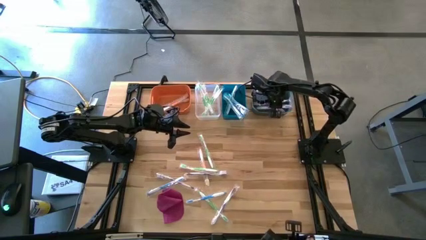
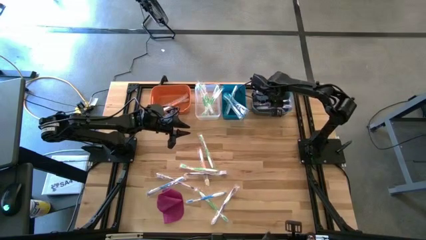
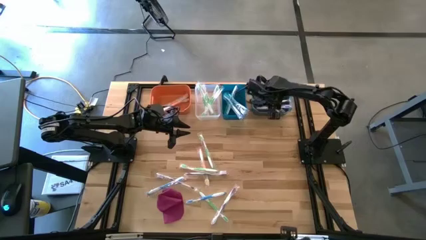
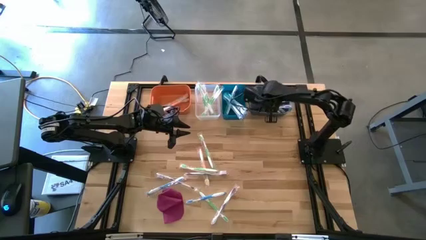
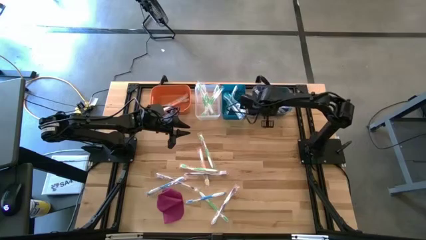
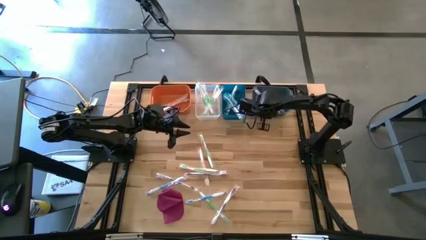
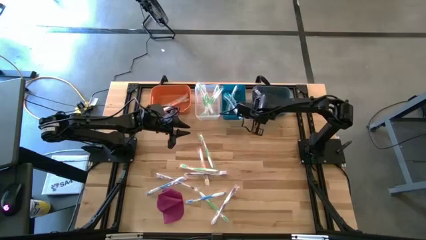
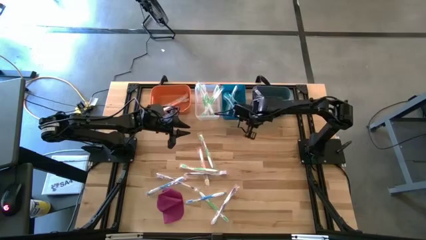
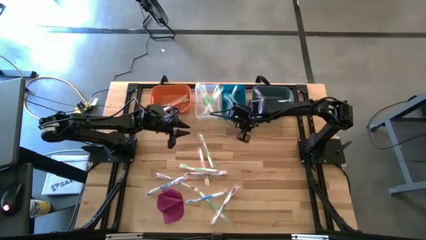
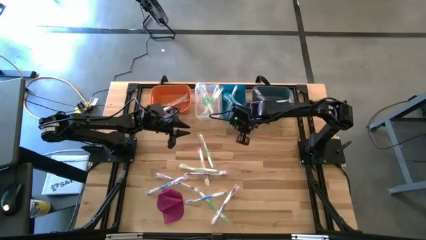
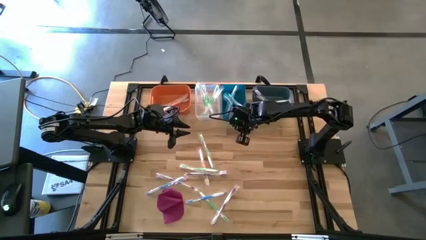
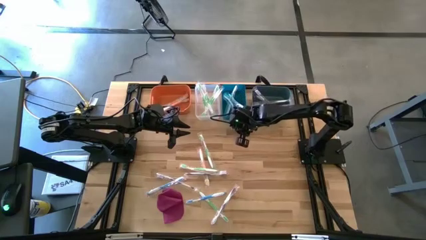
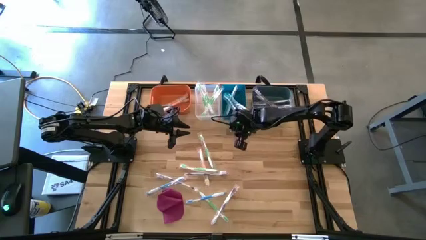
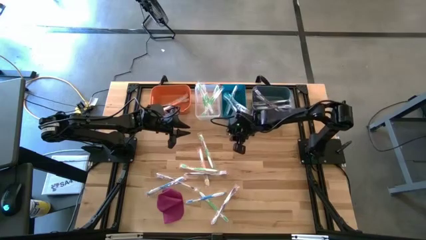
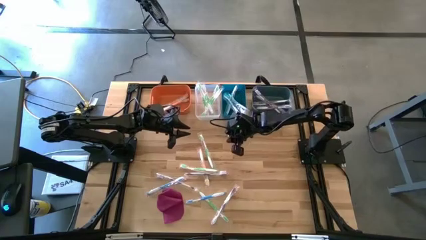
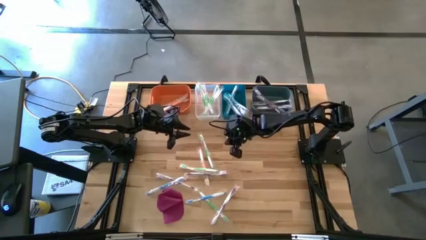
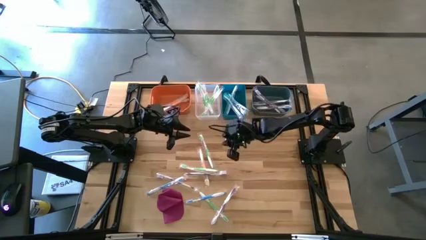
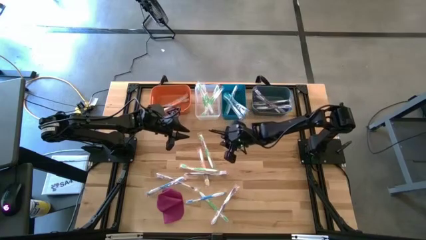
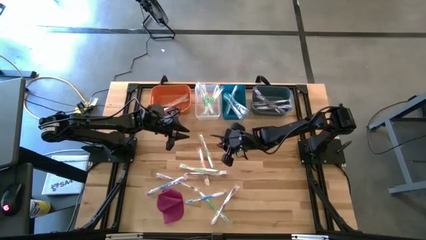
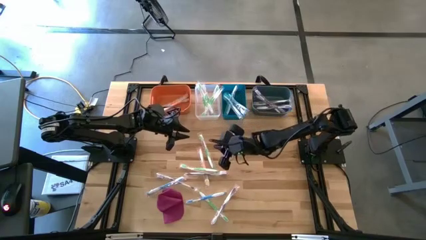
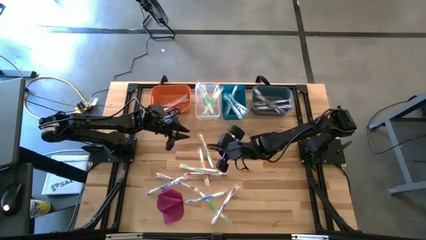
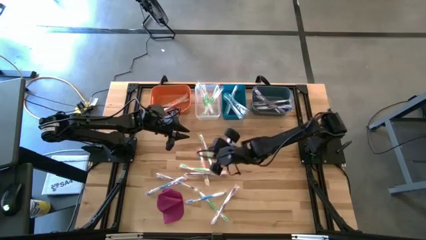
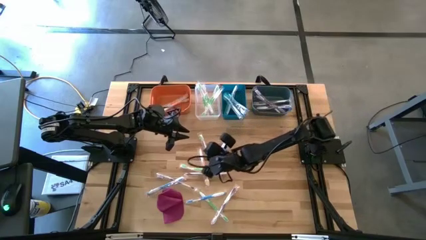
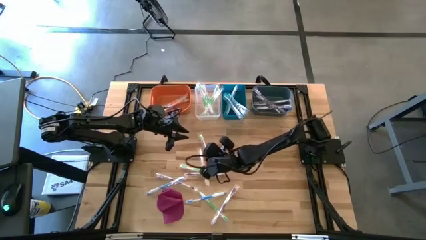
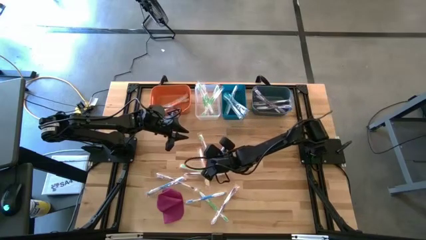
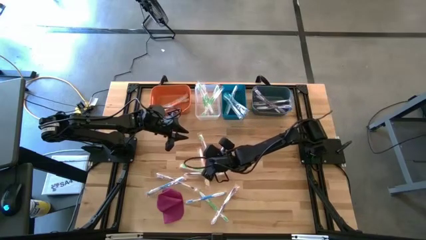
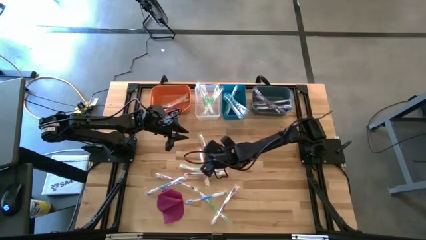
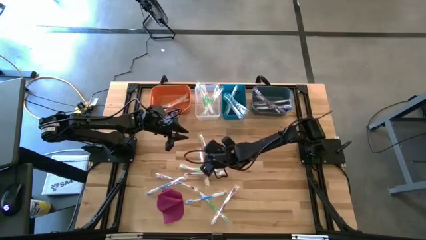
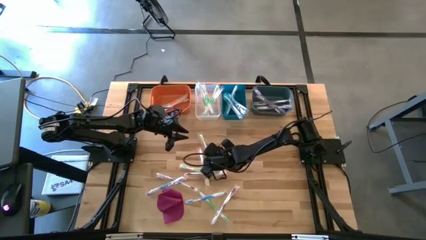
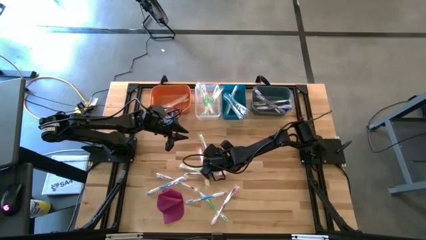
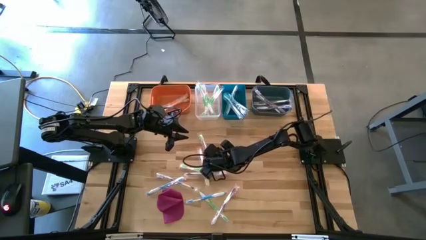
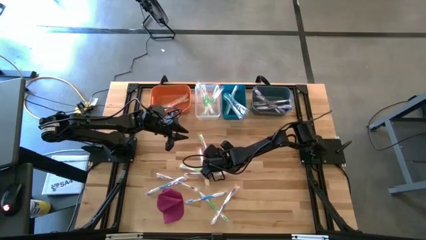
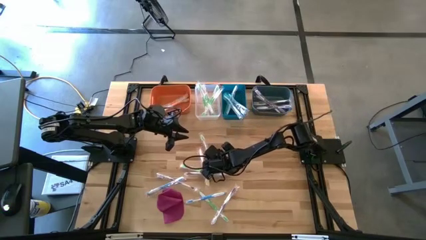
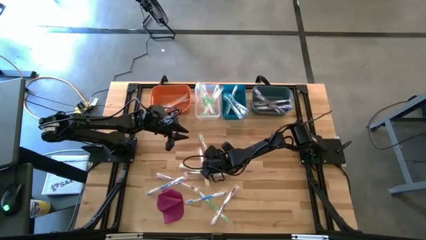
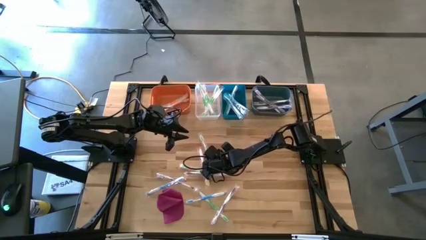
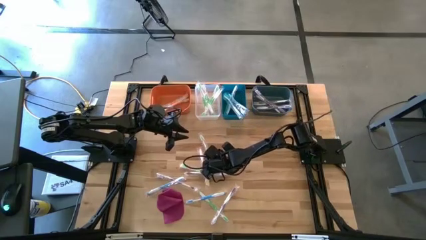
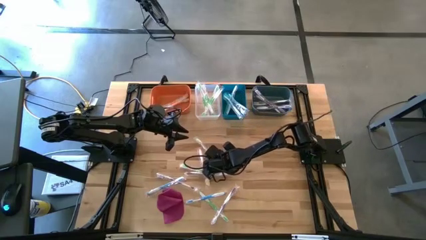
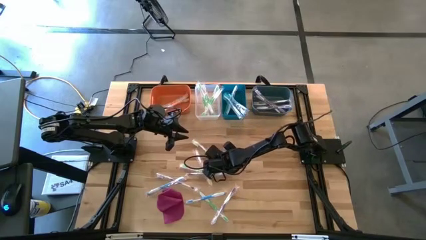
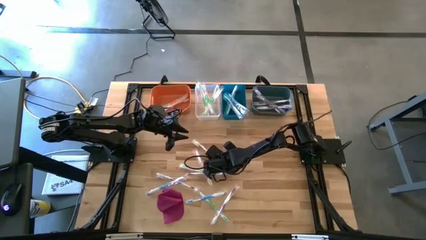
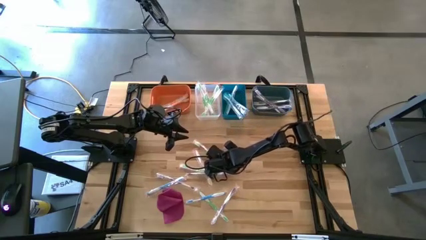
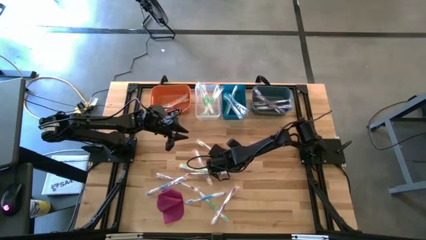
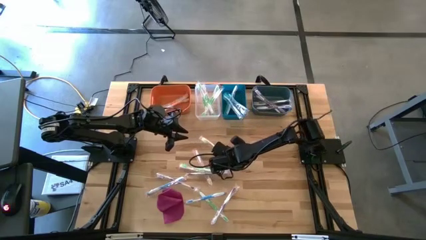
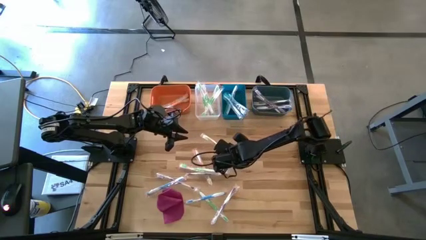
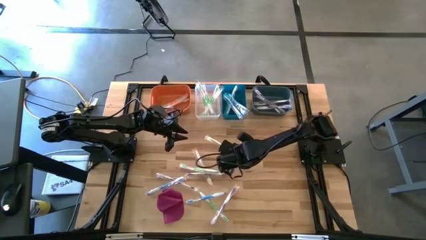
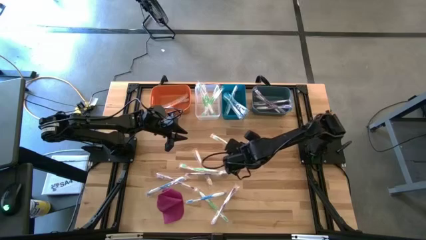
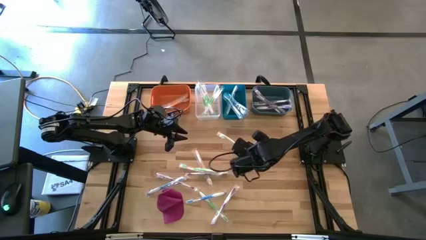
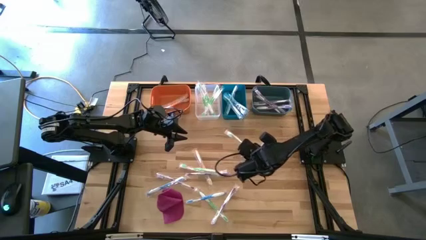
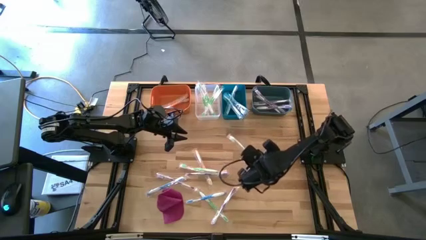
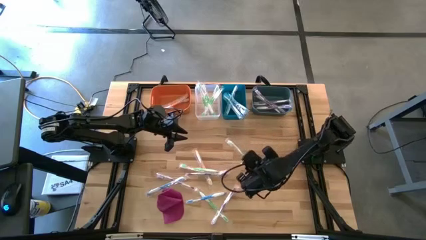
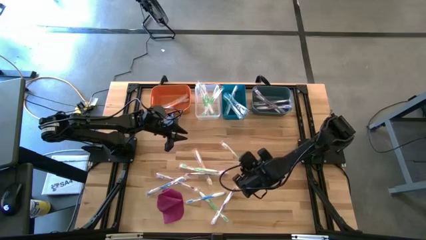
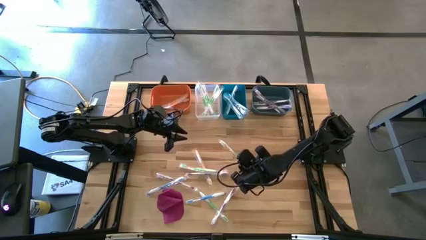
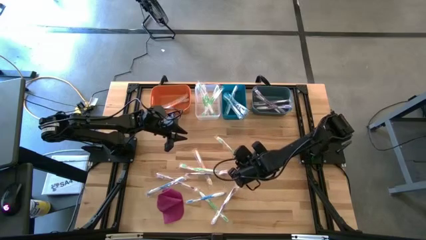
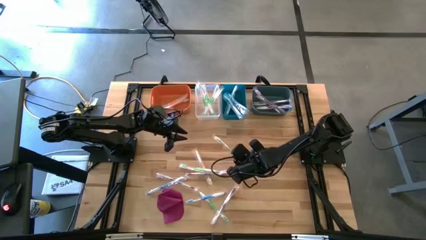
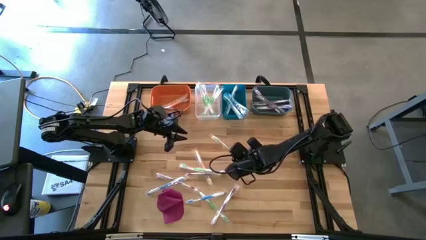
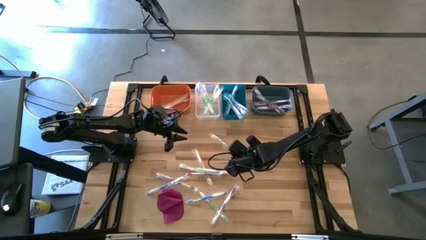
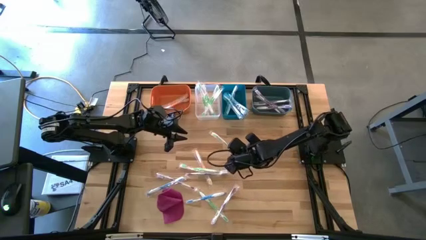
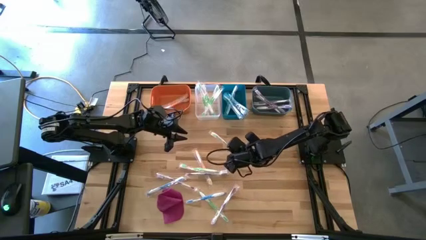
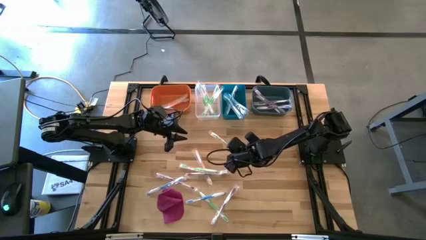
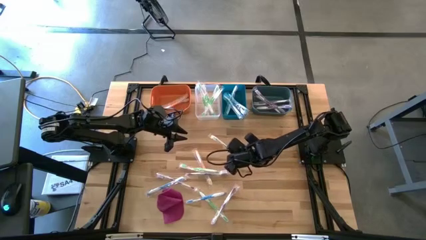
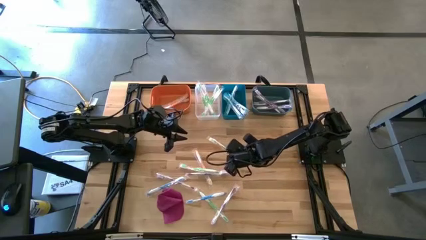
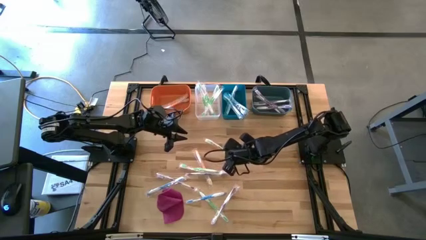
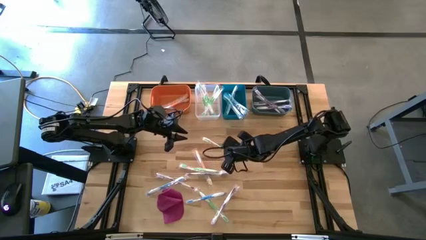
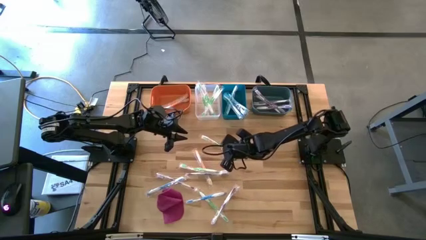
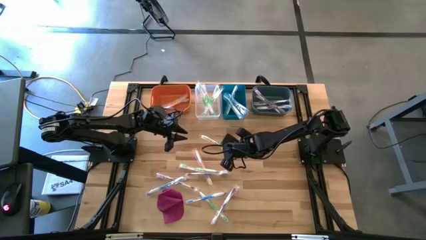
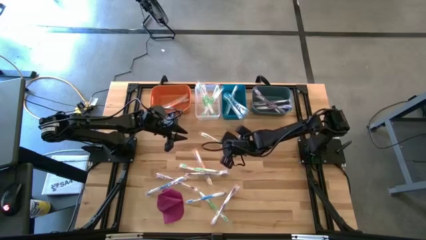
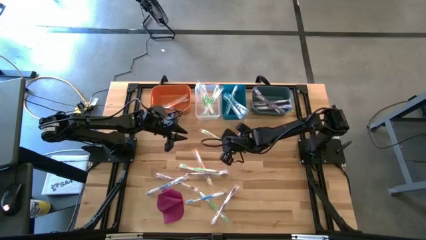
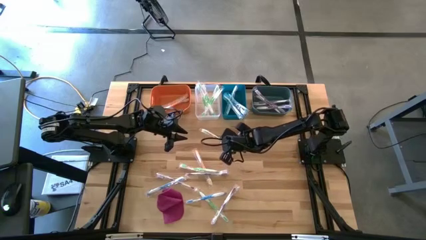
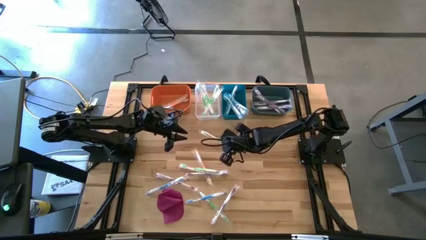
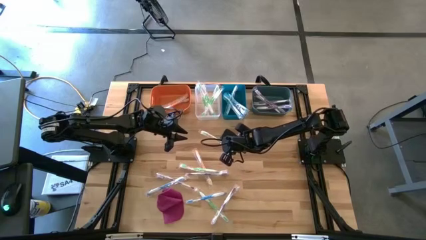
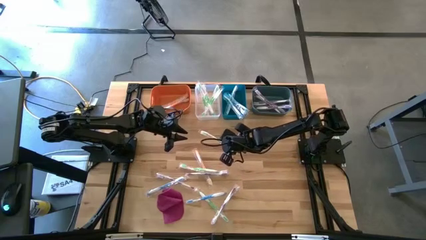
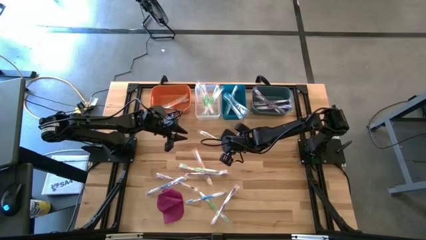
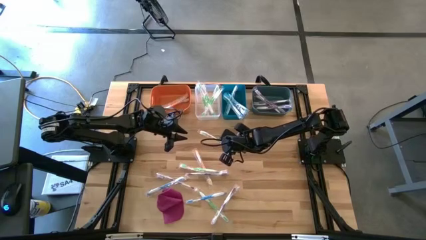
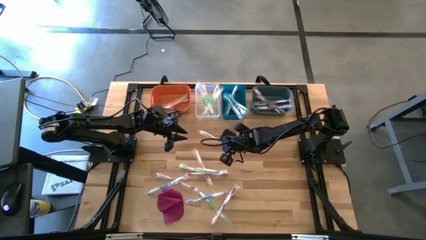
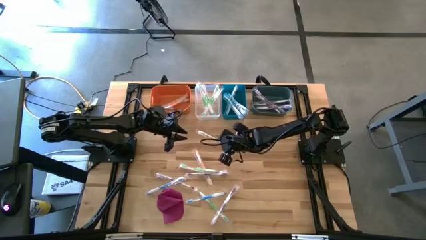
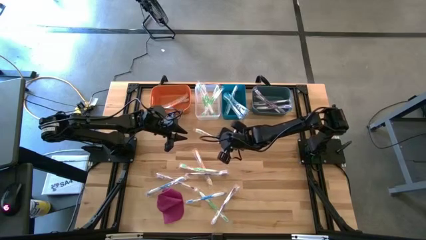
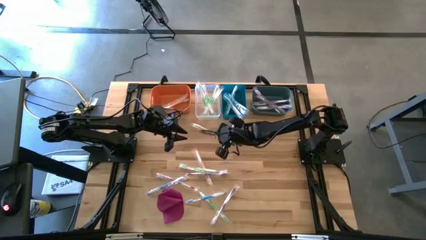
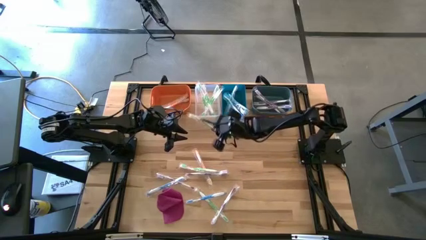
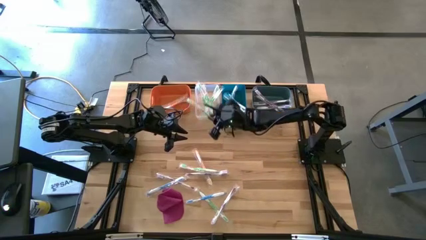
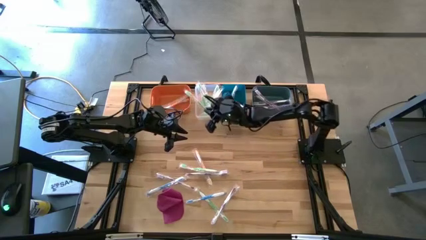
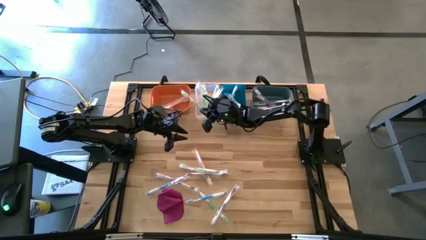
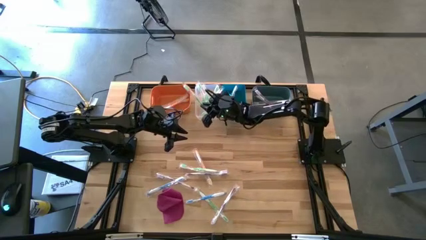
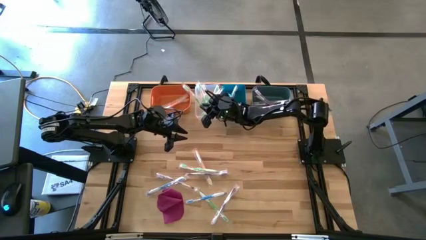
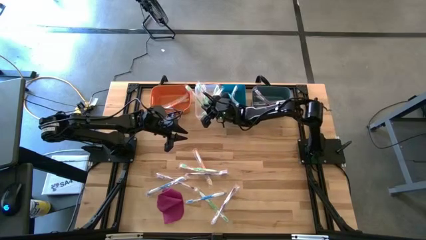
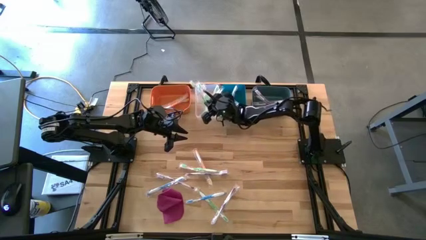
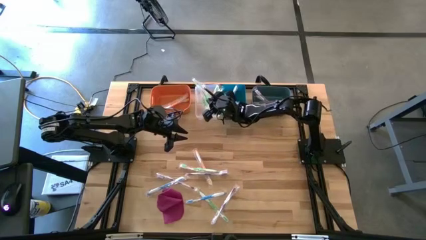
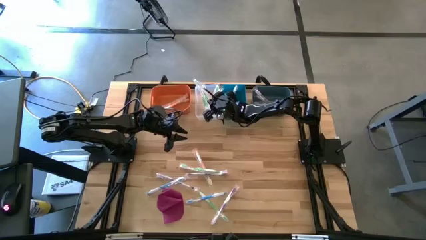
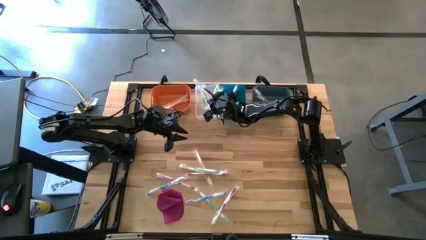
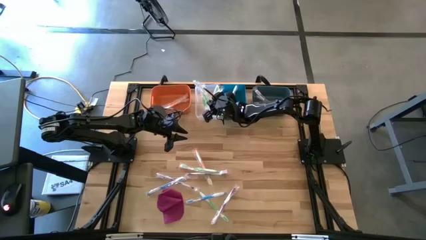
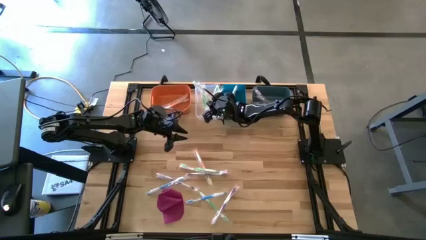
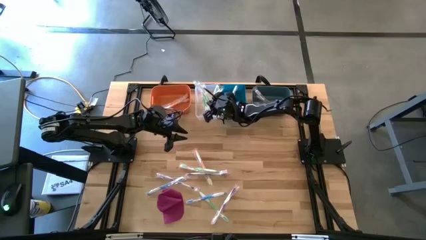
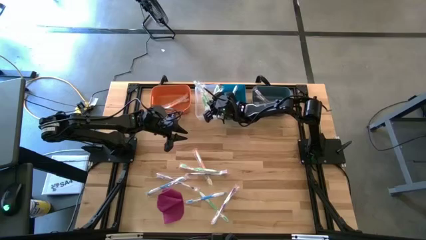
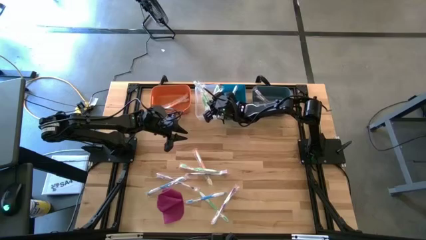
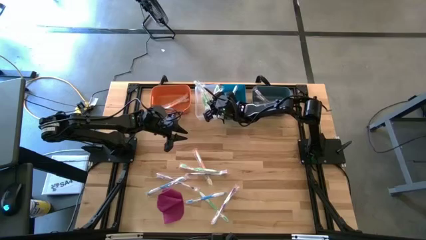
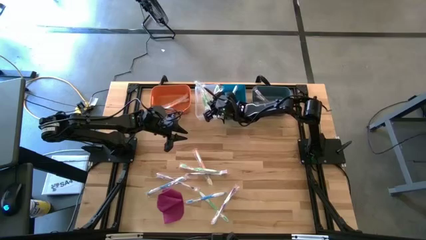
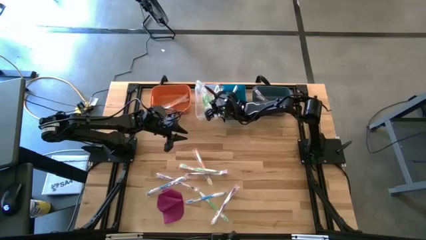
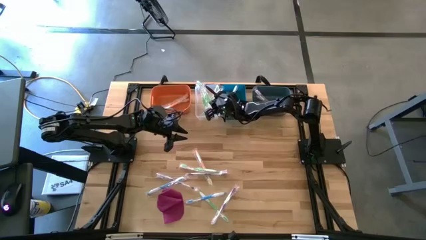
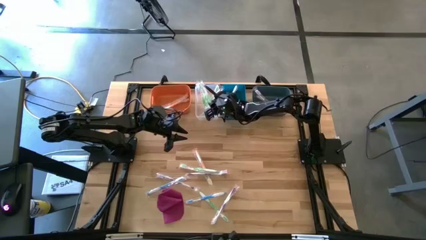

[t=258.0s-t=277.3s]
Task: Pick & Place Toothbrushes
Put the green toothbrush into the transparent bin
